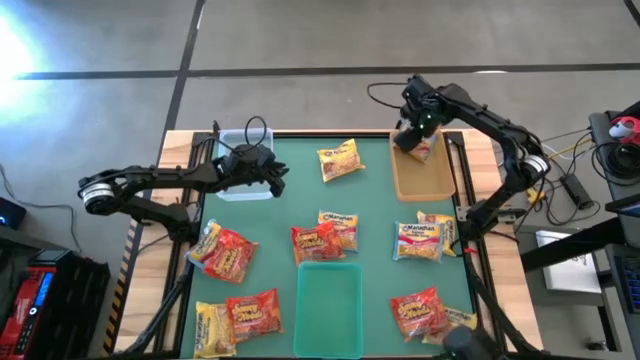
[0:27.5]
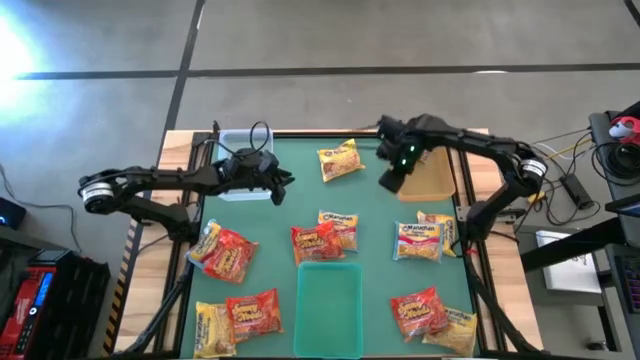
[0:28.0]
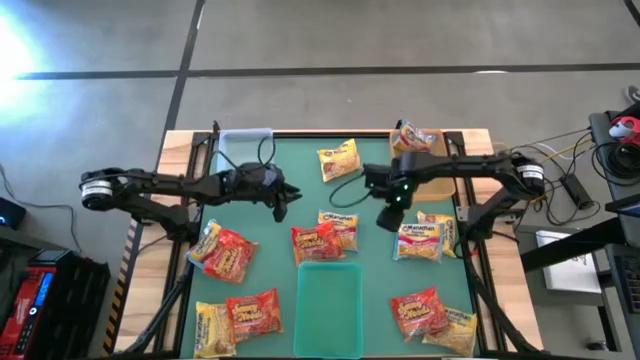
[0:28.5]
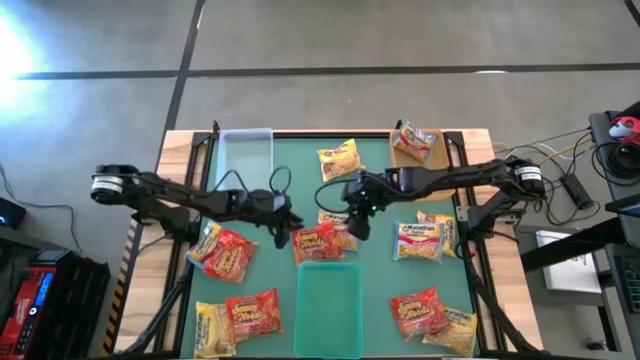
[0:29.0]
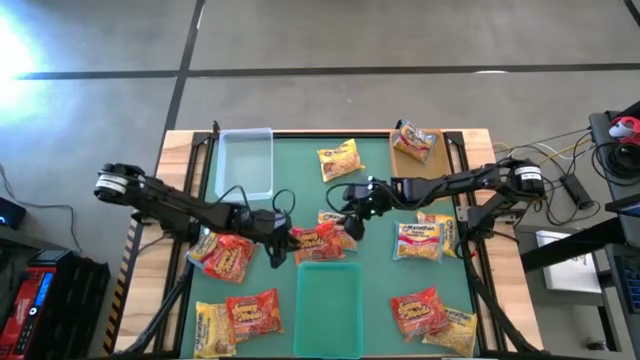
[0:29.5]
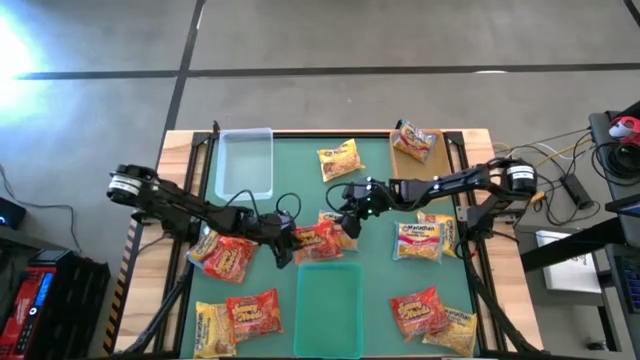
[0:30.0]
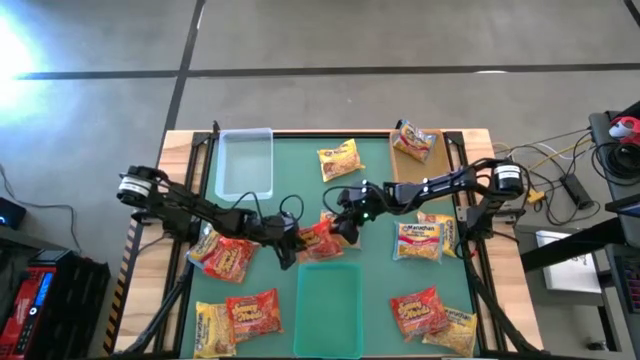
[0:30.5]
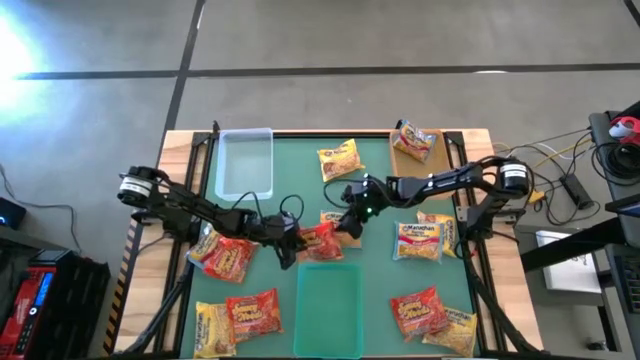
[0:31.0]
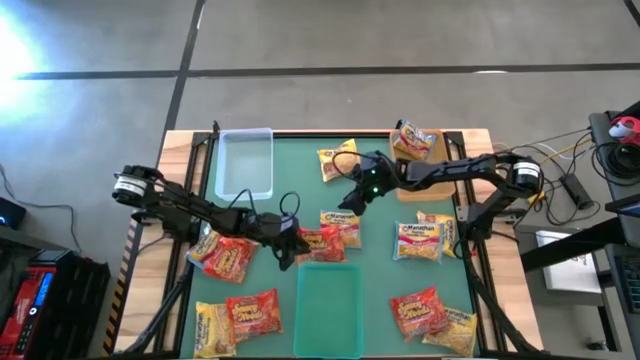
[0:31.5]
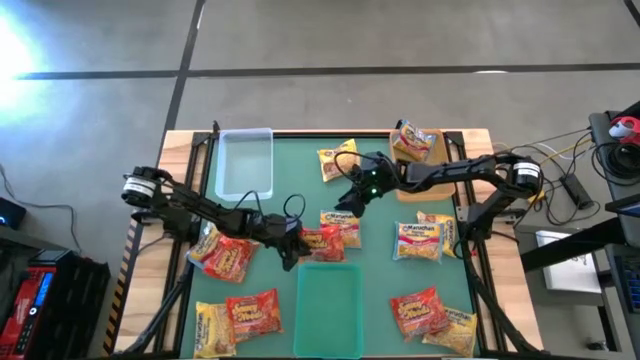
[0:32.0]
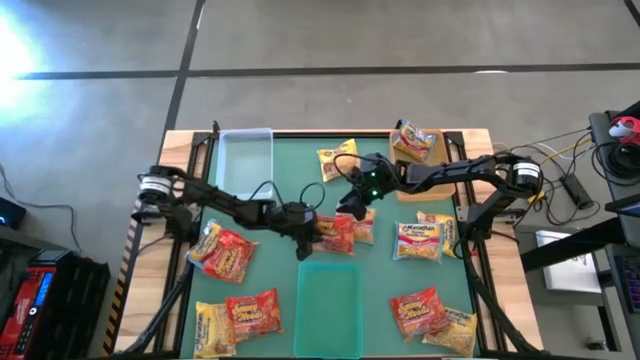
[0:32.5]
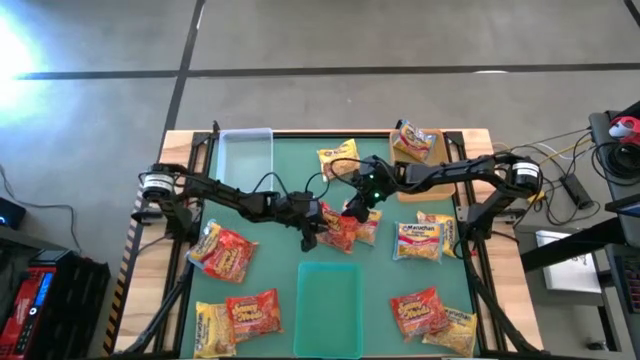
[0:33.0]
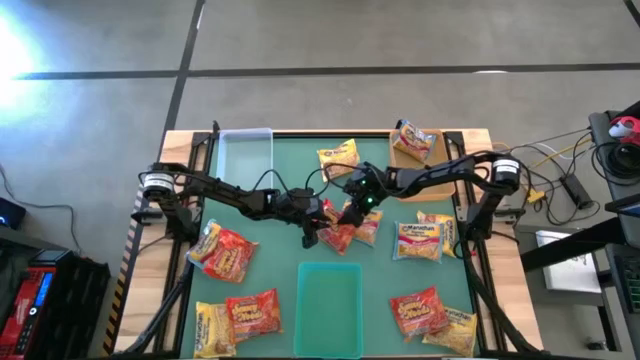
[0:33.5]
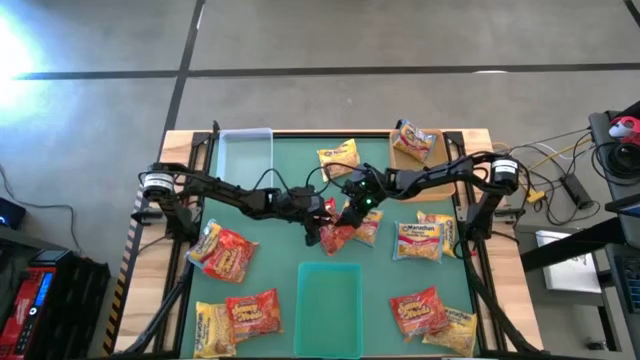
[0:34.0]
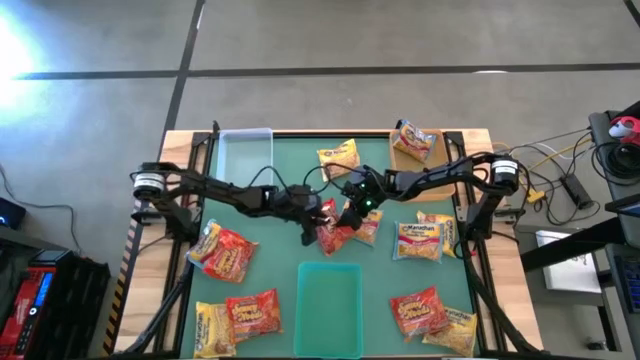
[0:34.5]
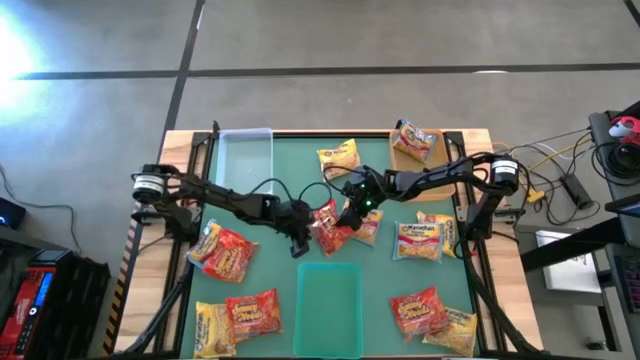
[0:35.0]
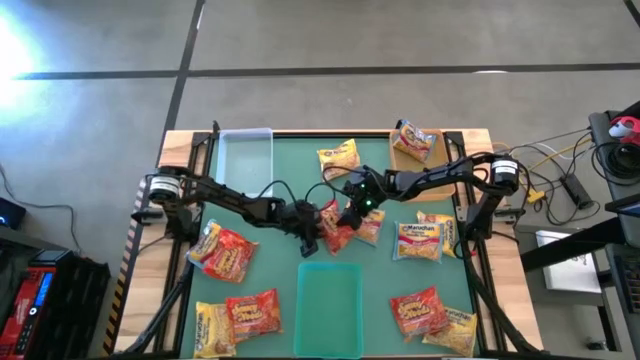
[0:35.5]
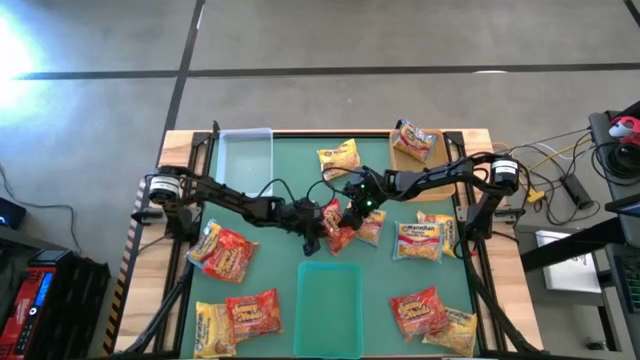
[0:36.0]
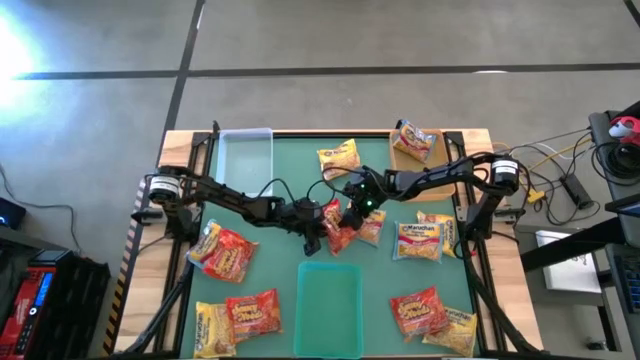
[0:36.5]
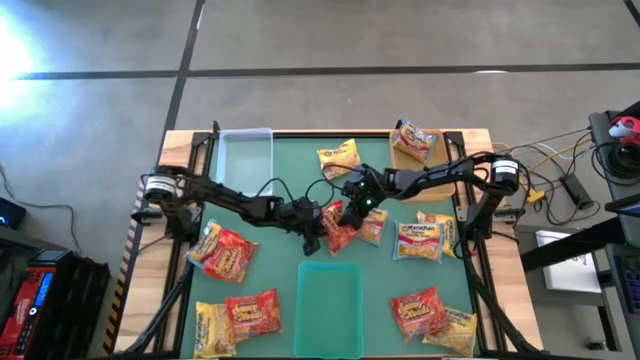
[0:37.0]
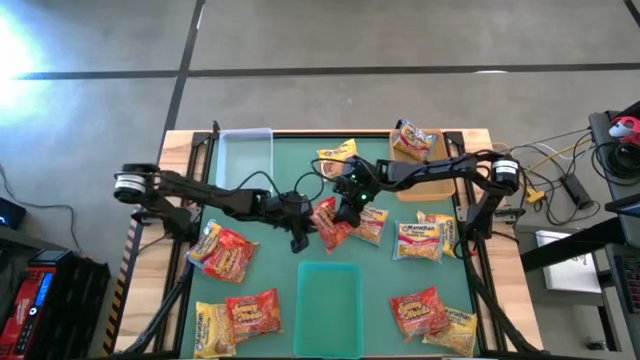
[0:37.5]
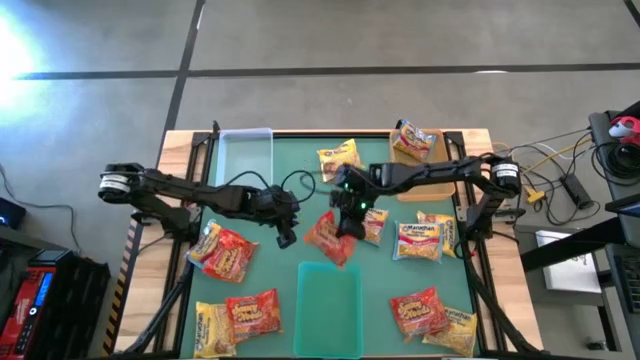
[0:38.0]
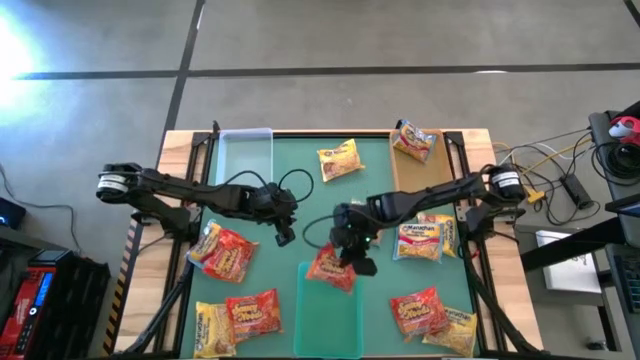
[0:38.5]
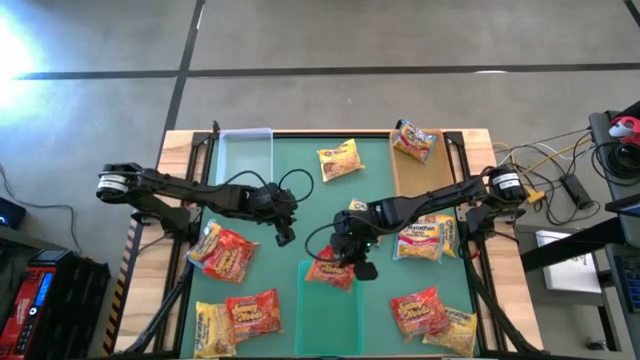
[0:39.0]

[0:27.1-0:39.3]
Task: Sort Maruchan noodles
Put the red noodle pack into the green bin

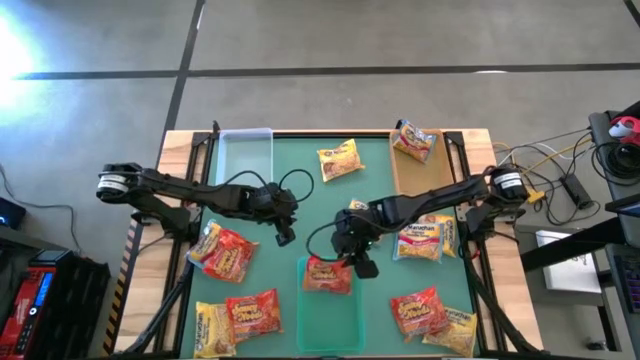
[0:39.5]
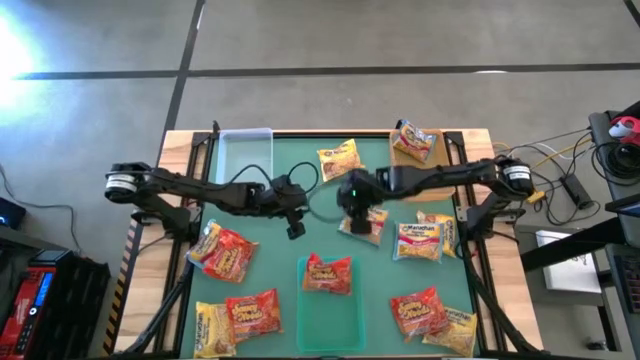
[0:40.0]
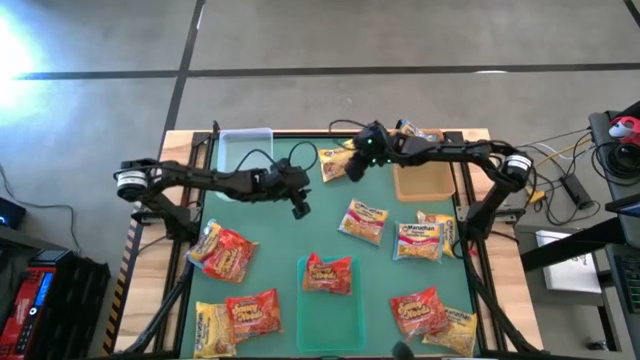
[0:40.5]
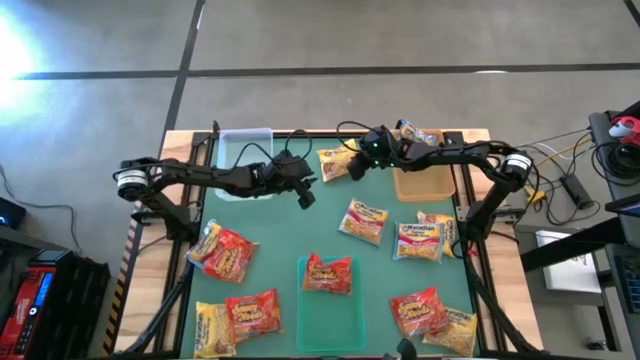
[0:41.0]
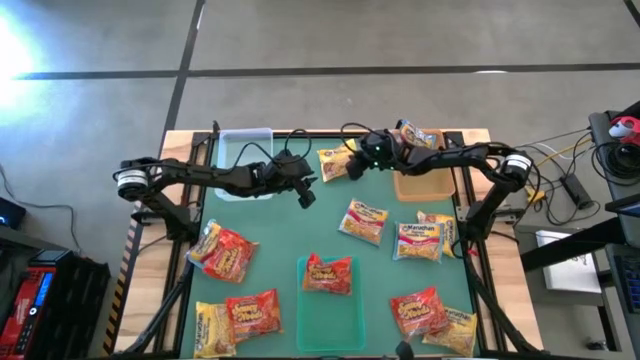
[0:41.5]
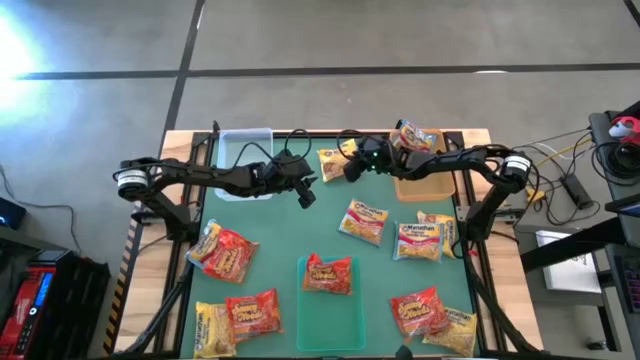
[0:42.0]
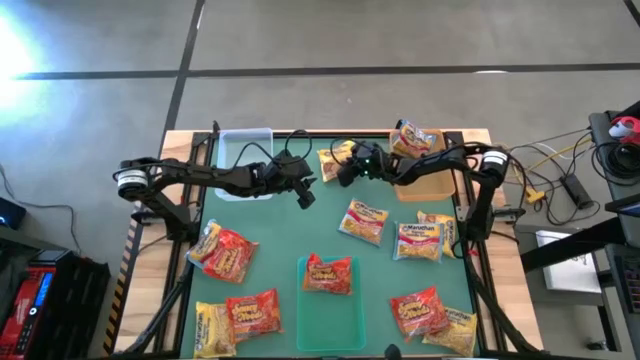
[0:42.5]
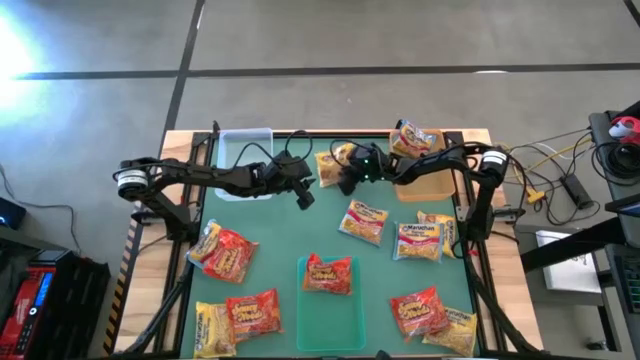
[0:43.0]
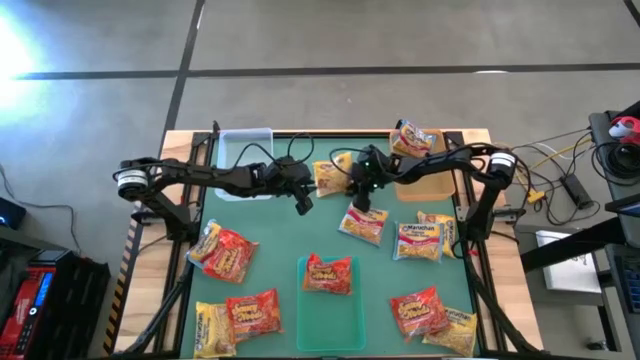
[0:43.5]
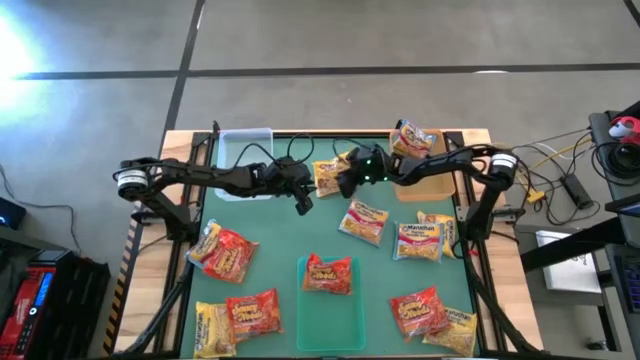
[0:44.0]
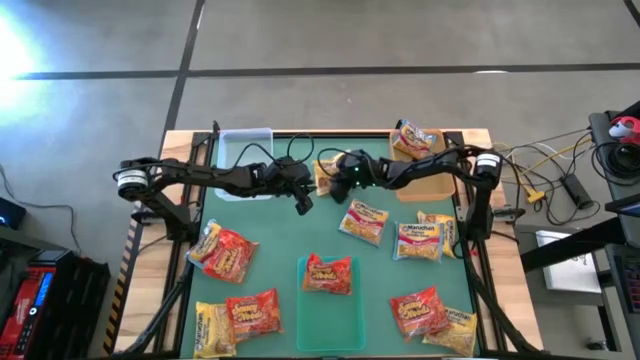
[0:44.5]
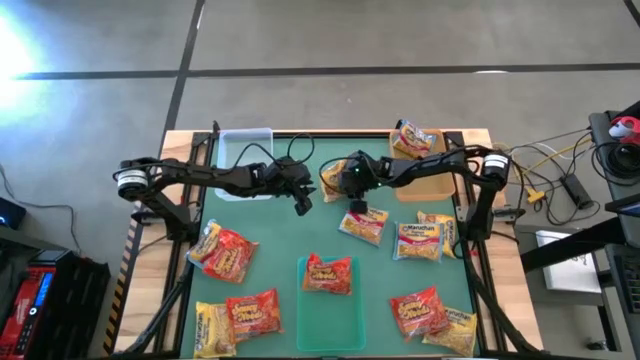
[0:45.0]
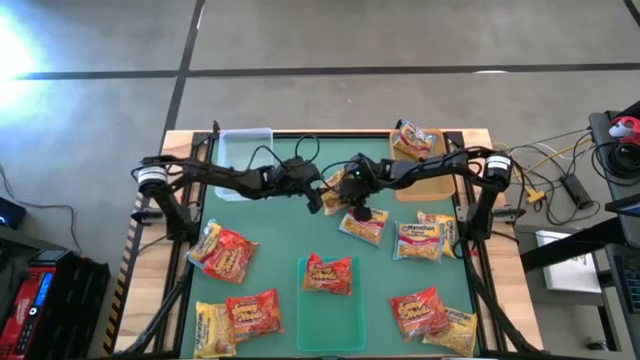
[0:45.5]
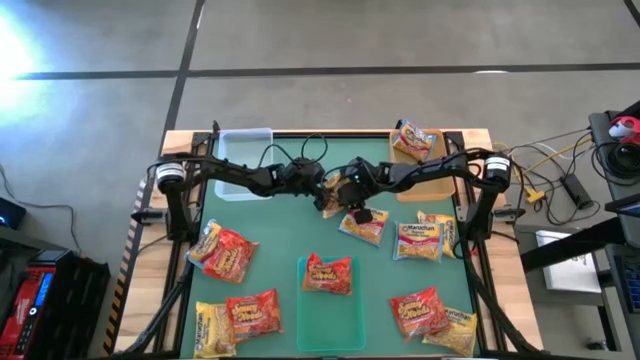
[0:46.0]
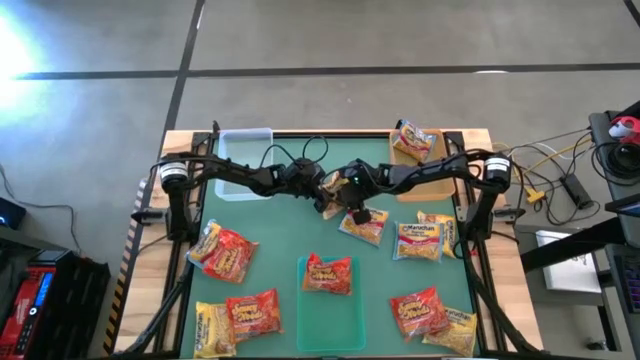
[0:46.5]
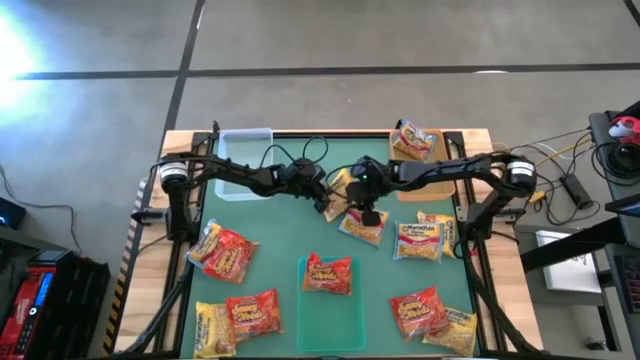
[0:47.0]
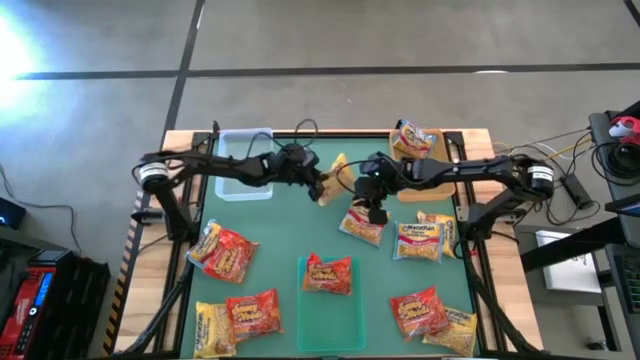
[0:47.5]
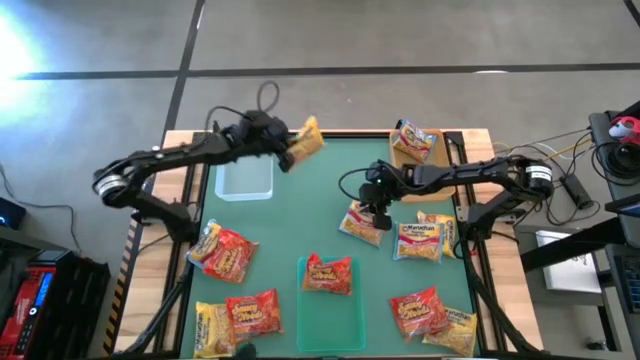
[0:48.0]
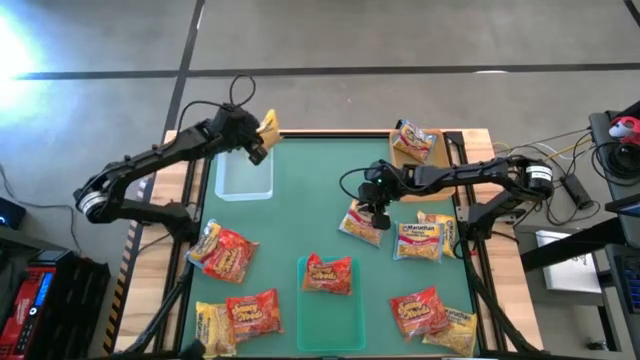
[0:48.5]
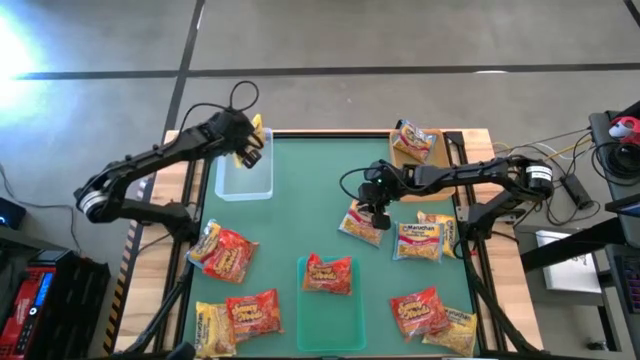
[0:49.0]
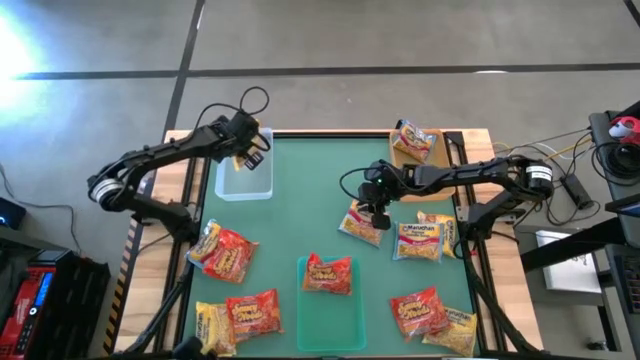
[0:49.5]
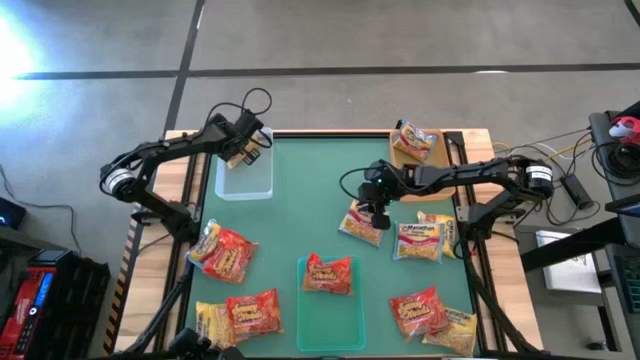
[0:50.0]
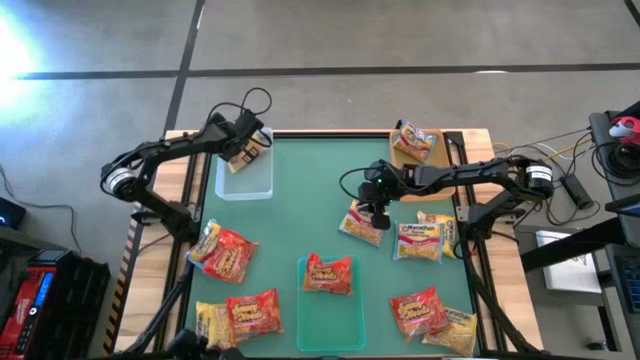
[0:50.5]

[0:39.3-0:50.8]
Put the yellow noodle pack into the transparent bin
